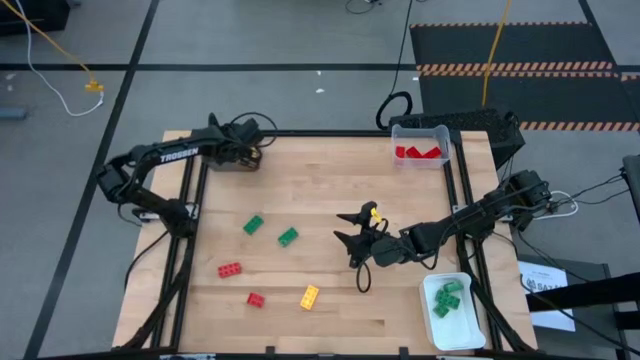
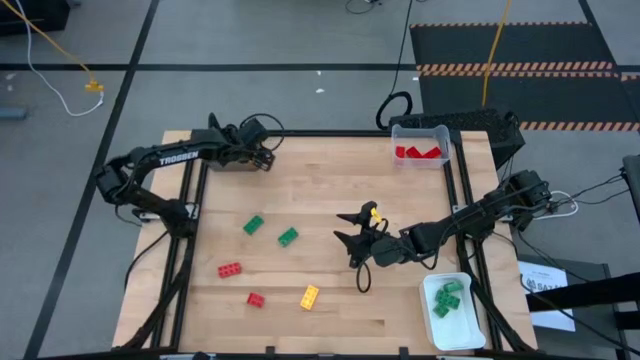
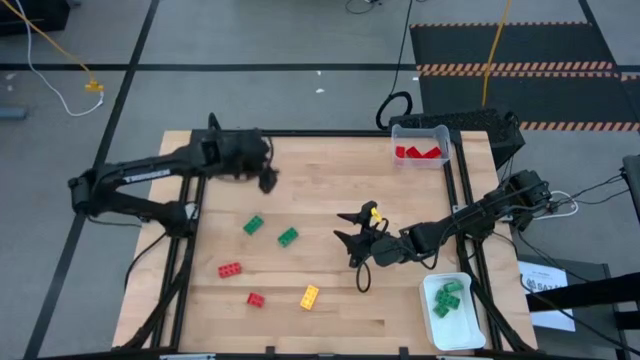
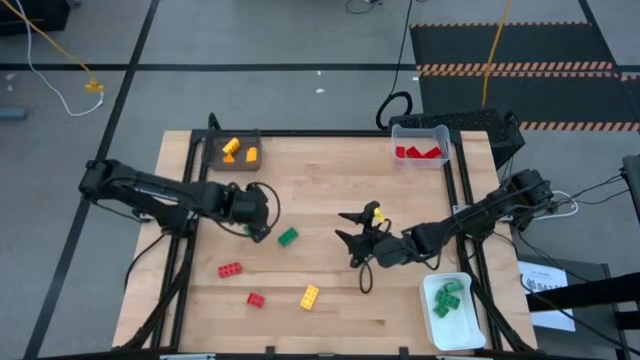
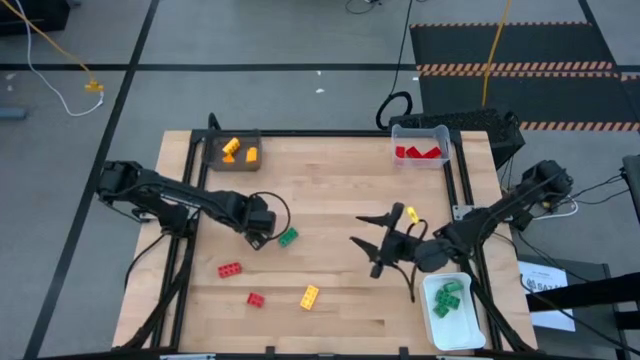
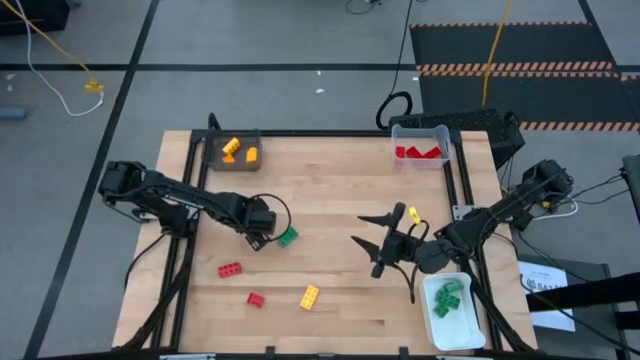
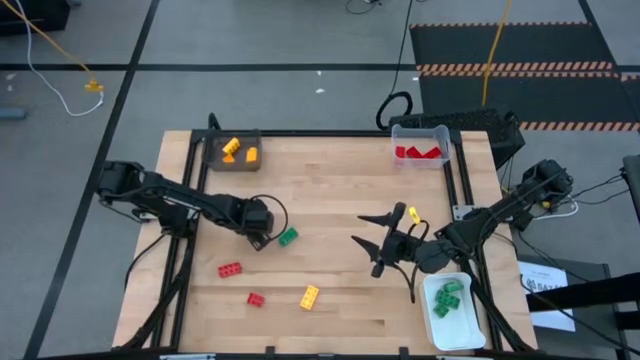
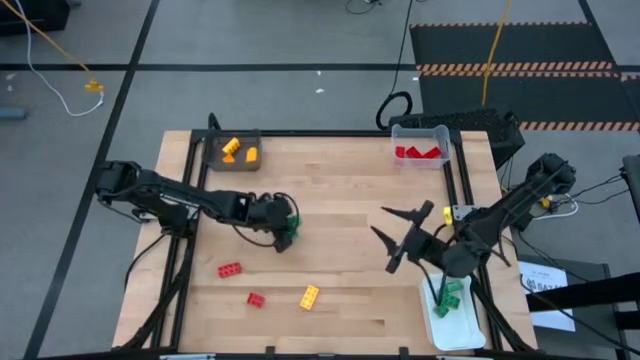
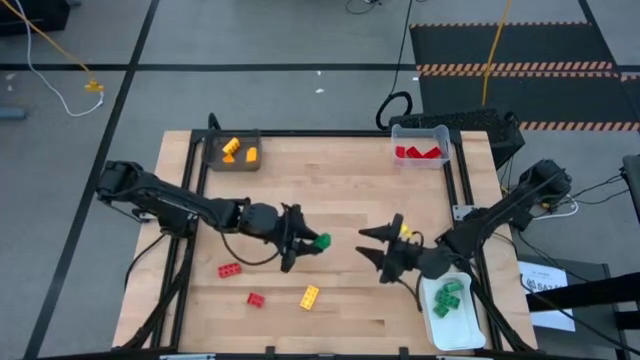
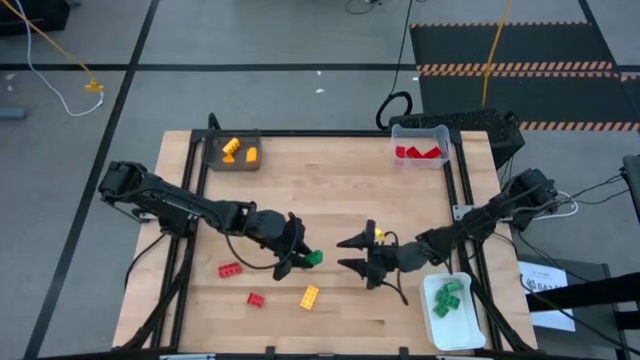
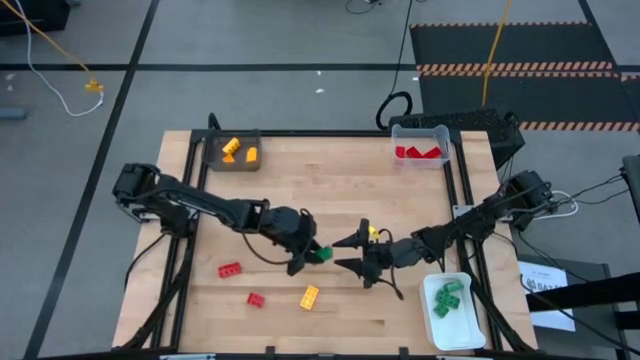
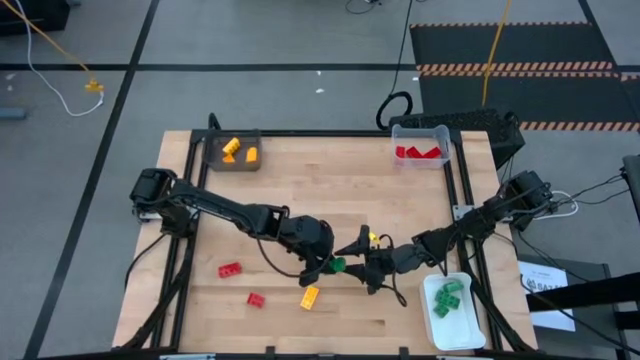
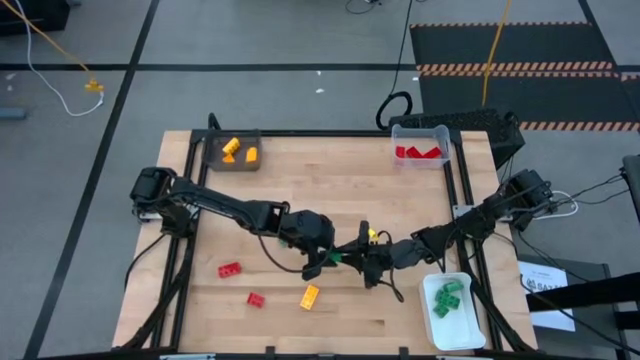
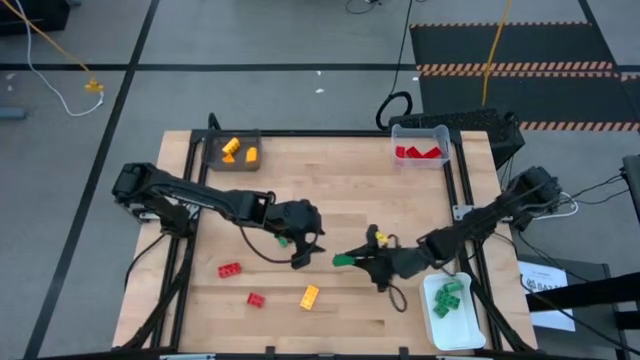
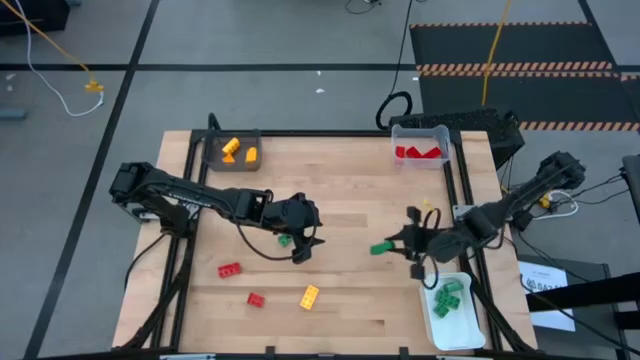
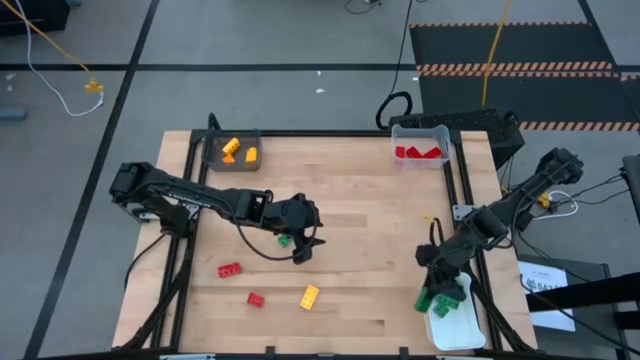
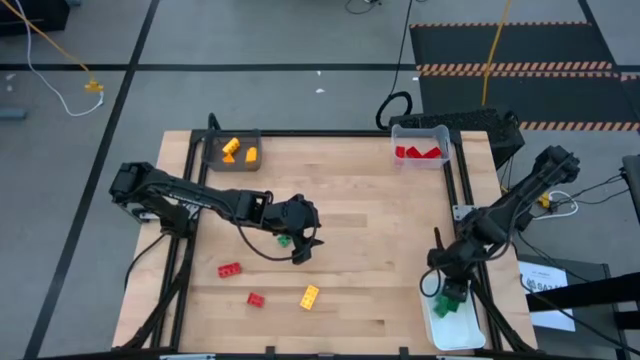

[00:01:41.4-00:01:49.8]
Task: Sort & place blocks by color
Put the green gamepiece into the white bin

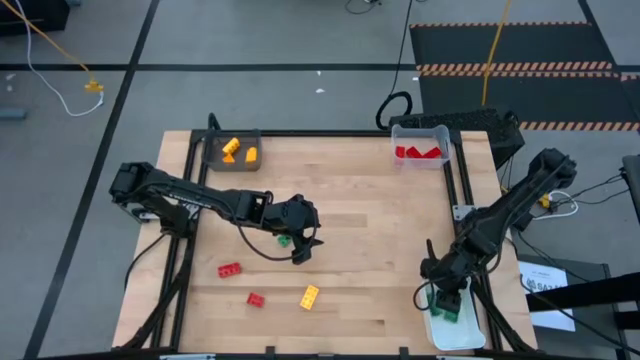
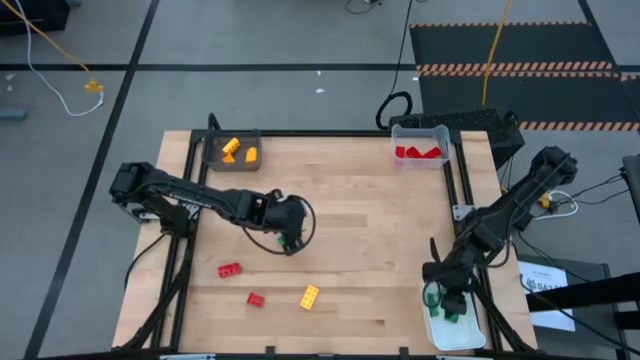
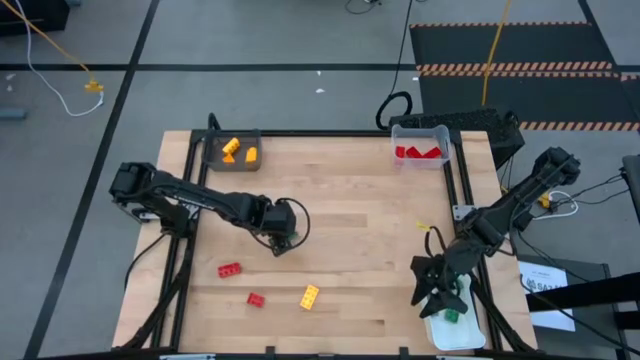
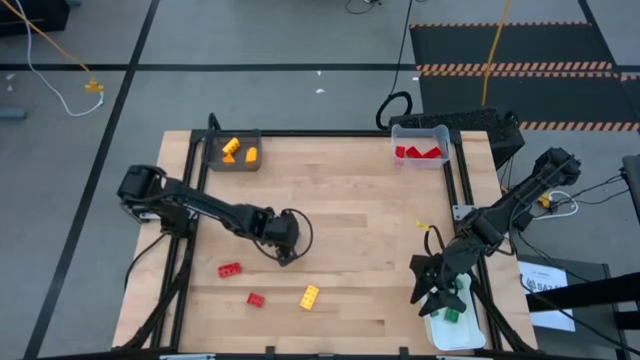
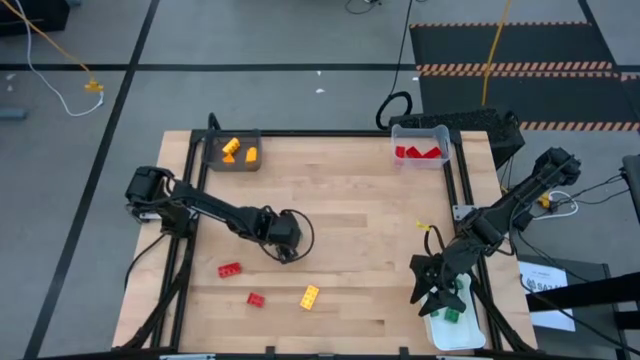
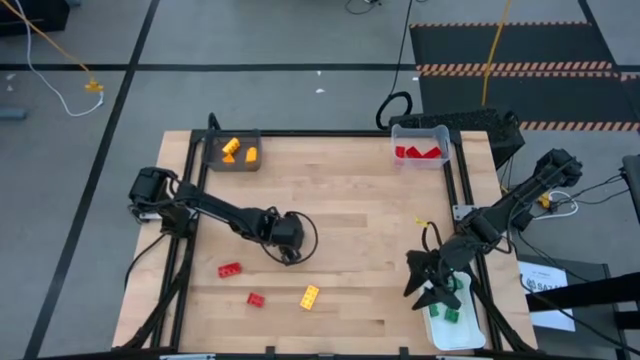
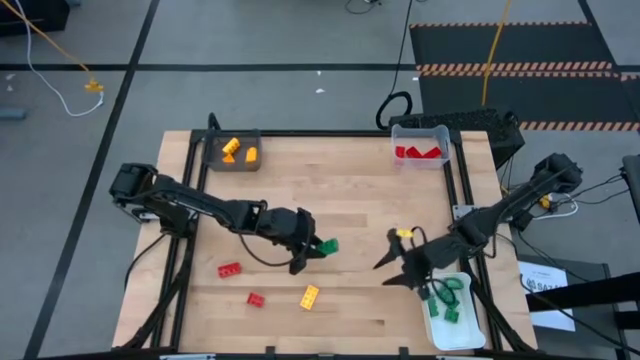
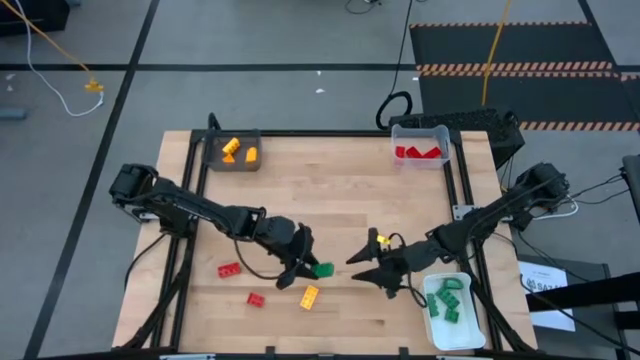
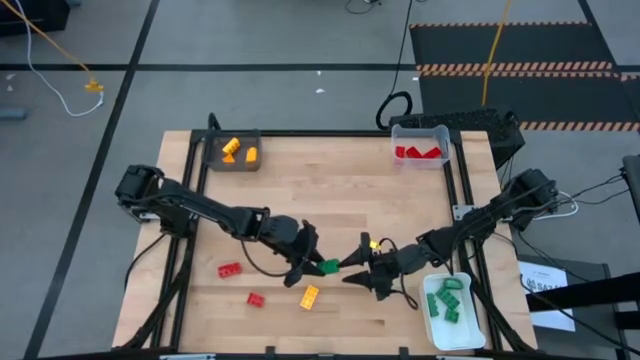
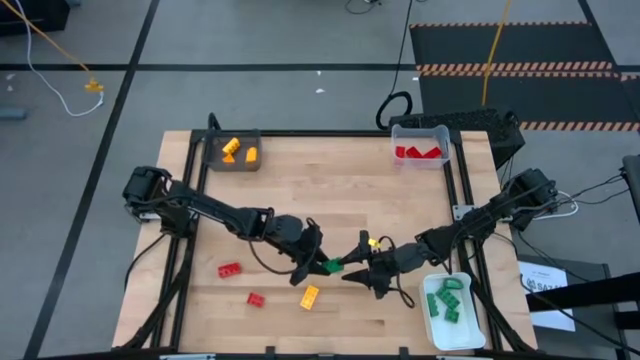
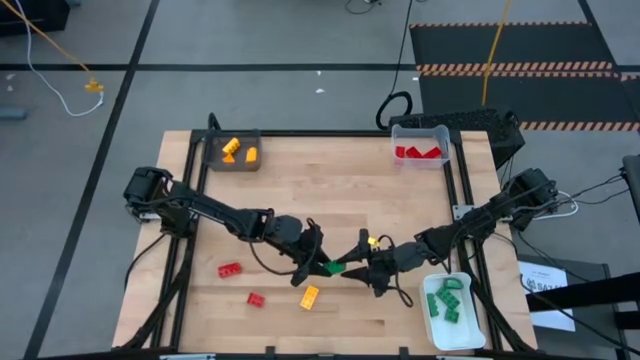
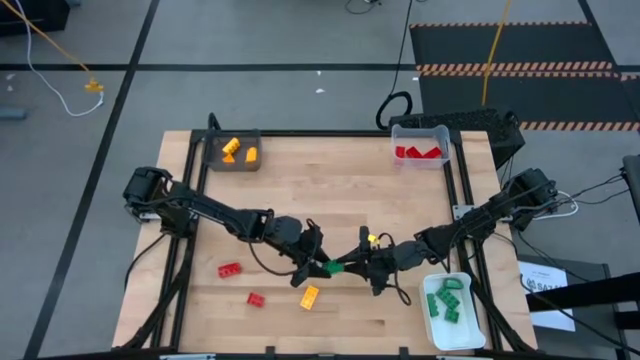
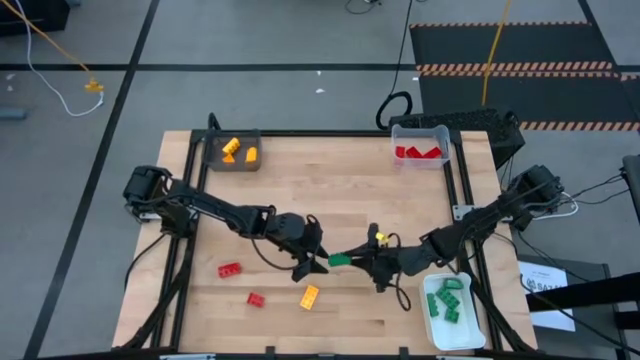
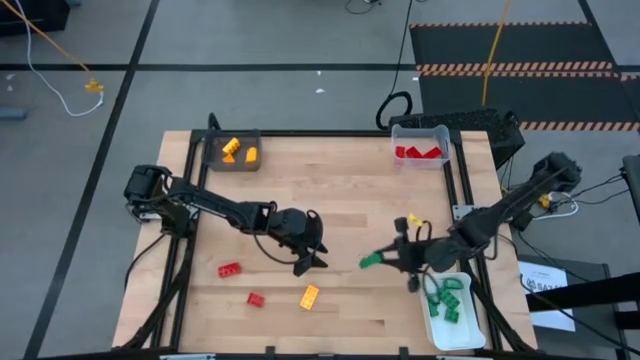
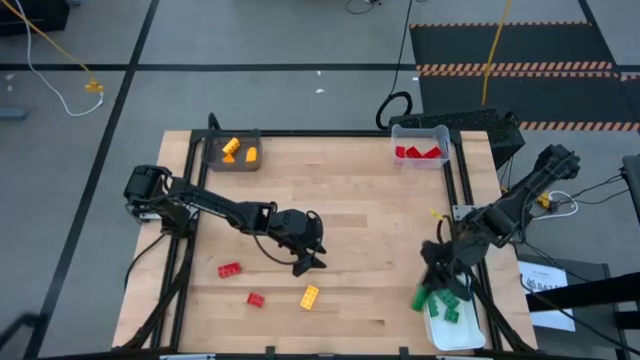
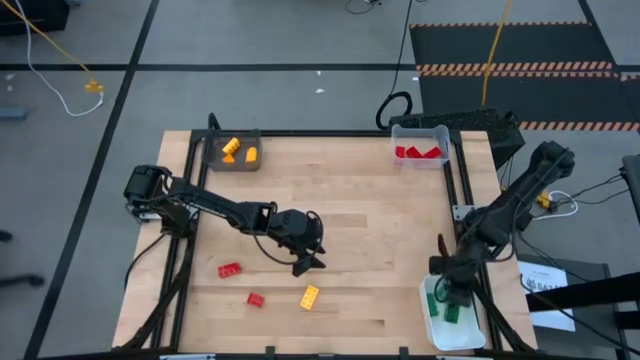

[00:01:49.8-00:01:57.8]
Put the green gamepiece into the white bin

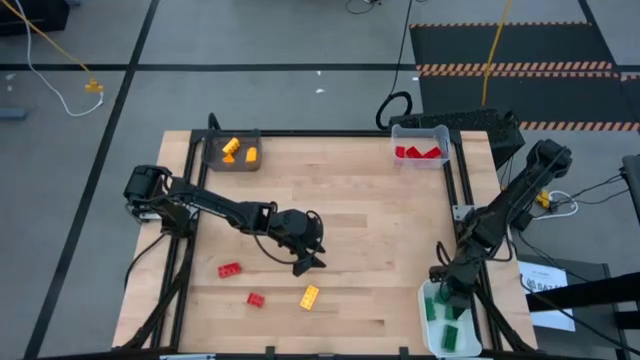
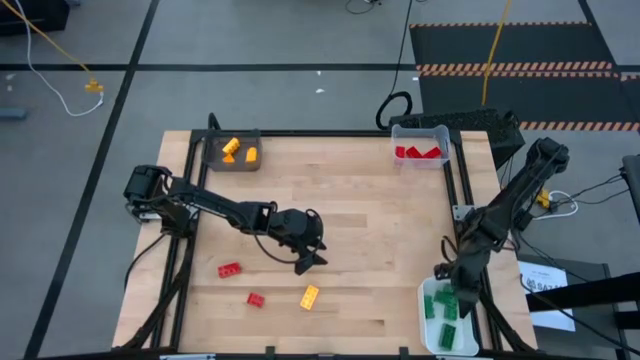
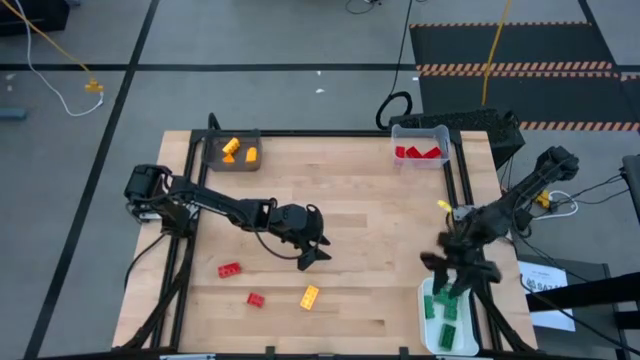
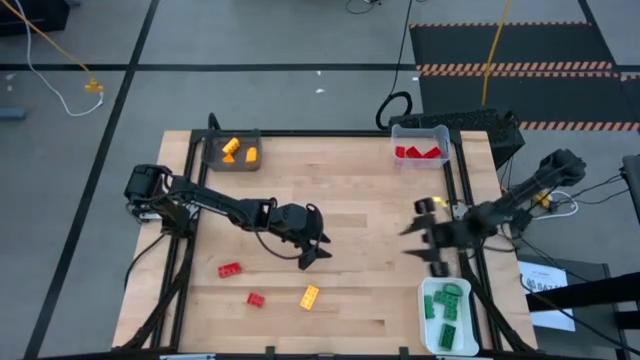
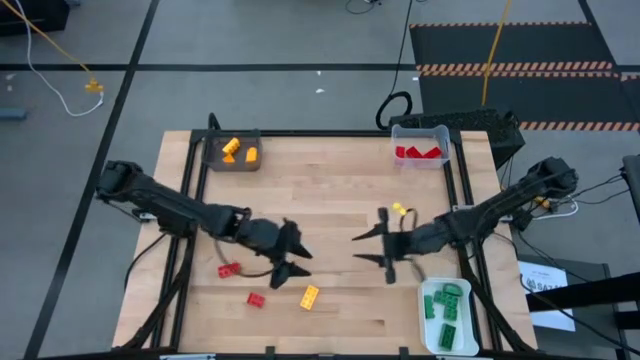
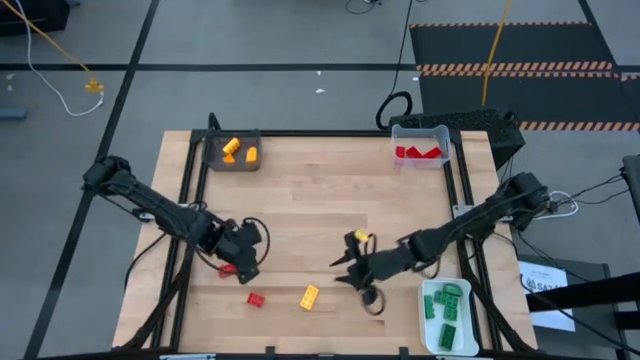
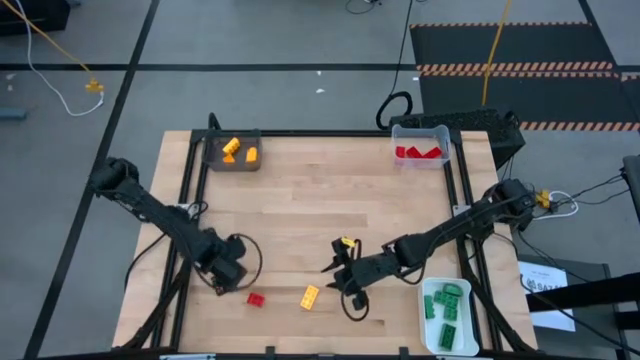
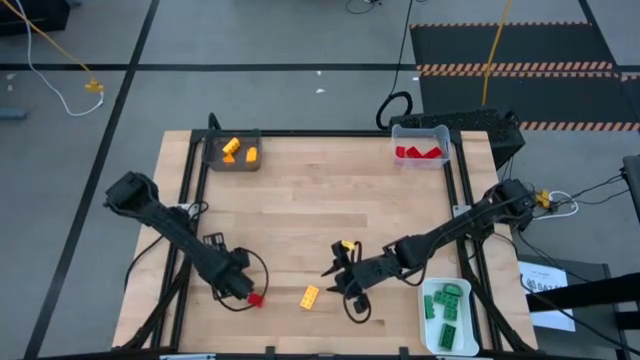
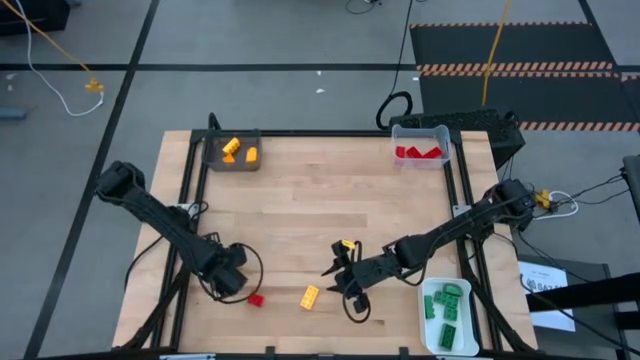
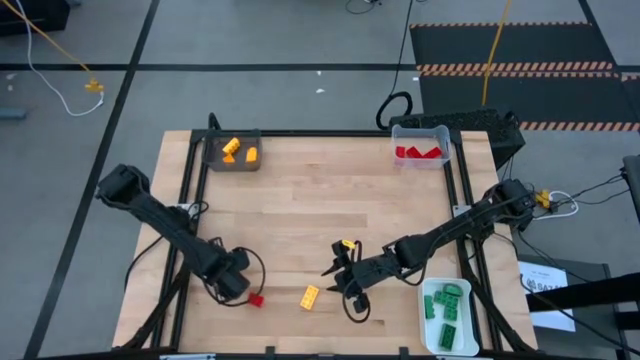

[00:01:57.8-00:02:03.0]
Put the red gamepiece into the transparent bin
